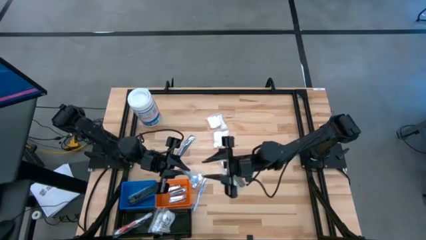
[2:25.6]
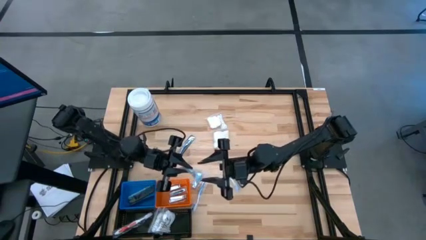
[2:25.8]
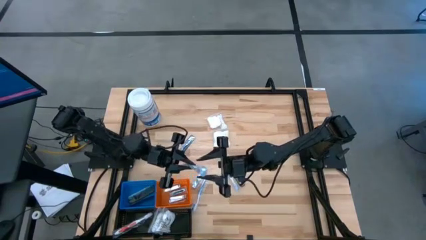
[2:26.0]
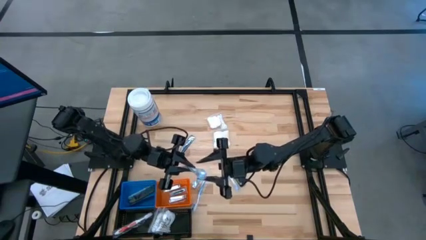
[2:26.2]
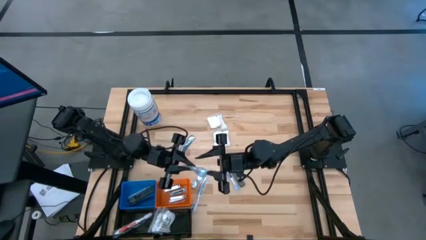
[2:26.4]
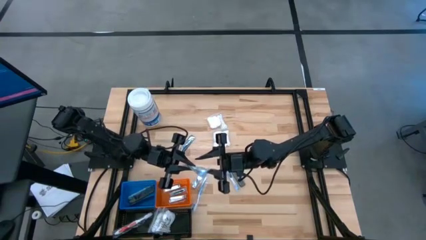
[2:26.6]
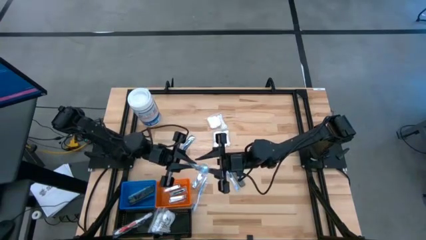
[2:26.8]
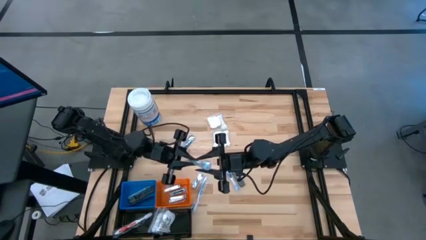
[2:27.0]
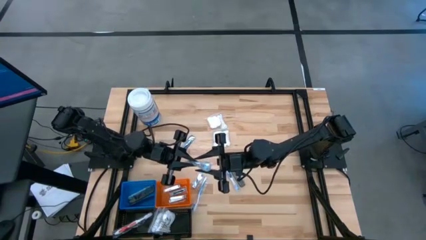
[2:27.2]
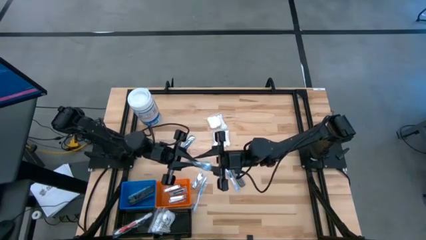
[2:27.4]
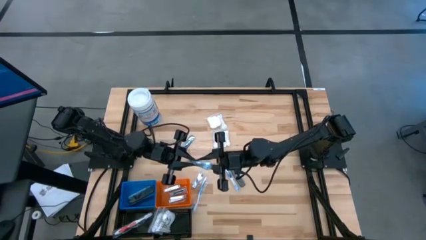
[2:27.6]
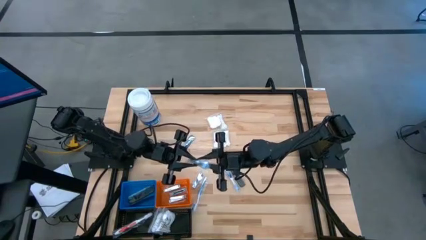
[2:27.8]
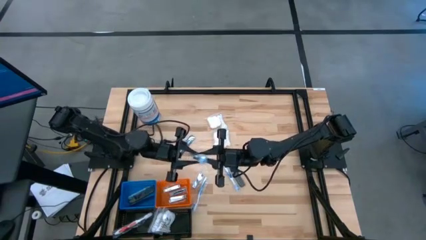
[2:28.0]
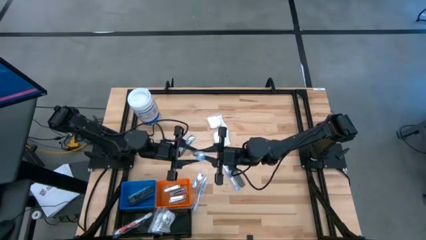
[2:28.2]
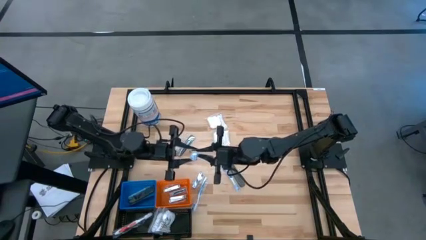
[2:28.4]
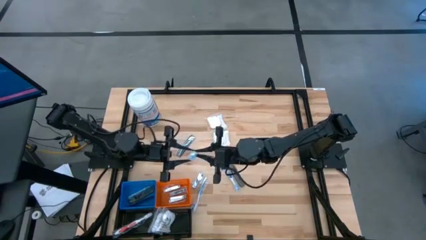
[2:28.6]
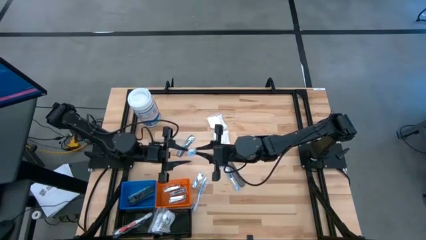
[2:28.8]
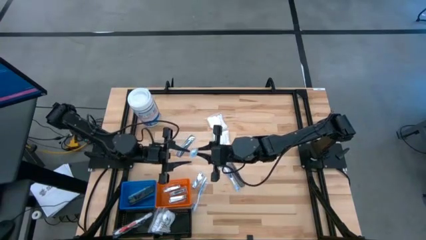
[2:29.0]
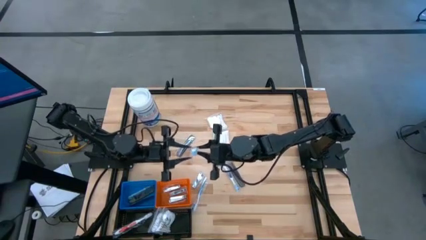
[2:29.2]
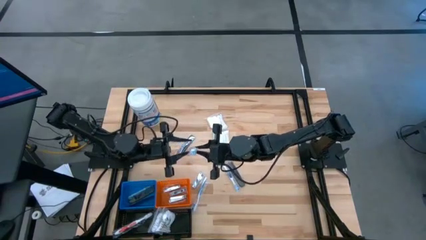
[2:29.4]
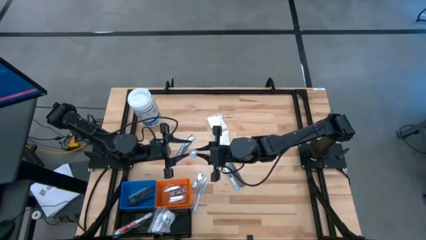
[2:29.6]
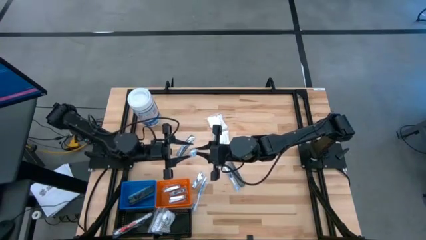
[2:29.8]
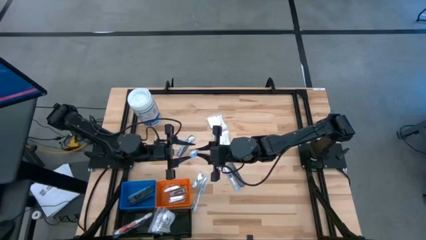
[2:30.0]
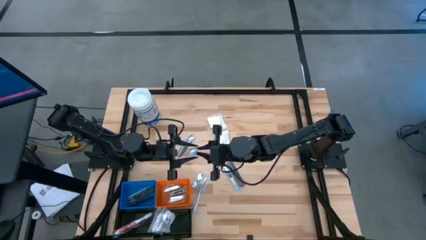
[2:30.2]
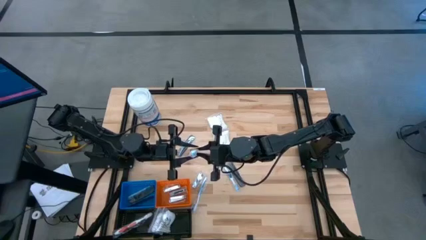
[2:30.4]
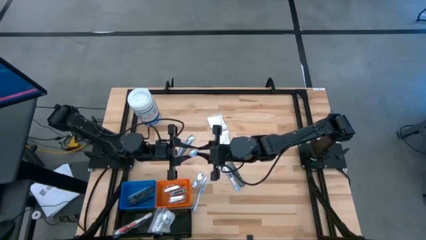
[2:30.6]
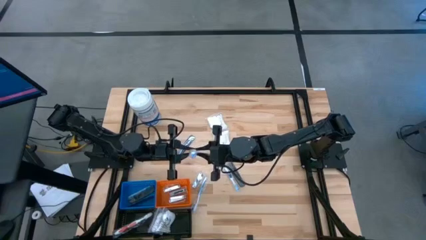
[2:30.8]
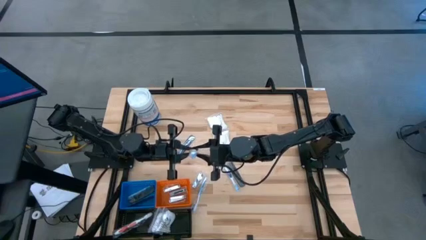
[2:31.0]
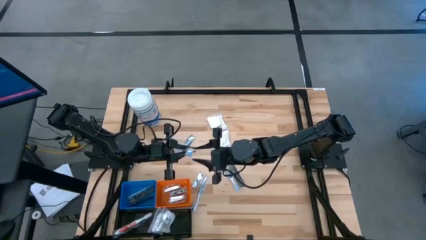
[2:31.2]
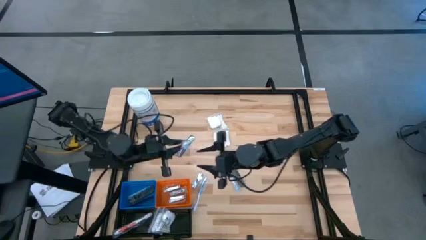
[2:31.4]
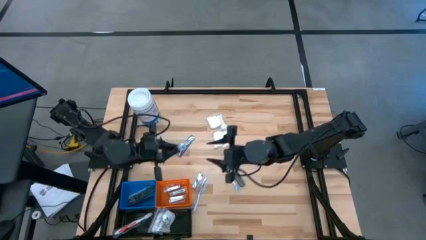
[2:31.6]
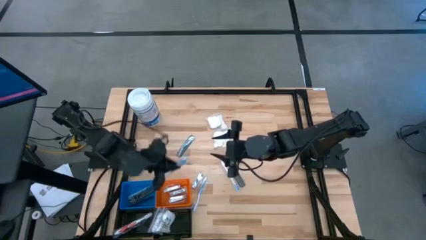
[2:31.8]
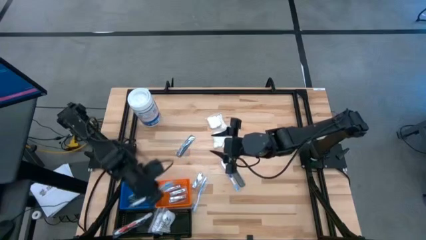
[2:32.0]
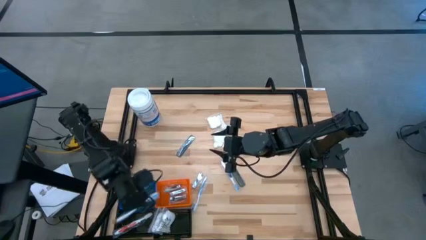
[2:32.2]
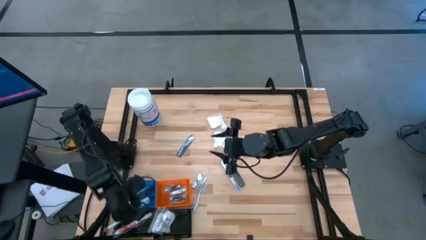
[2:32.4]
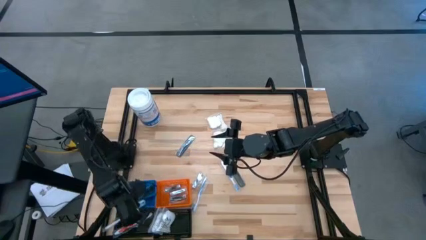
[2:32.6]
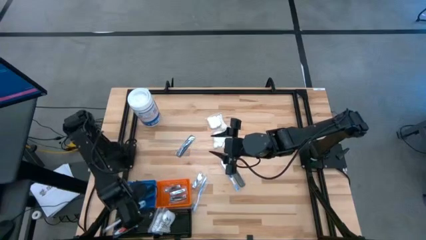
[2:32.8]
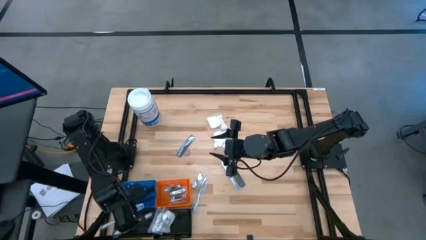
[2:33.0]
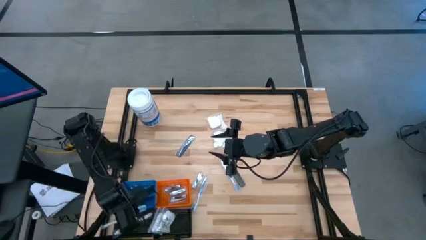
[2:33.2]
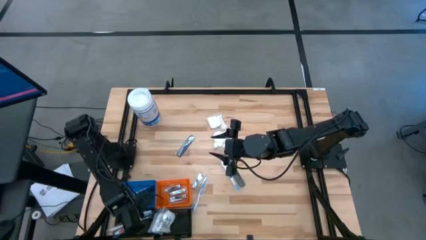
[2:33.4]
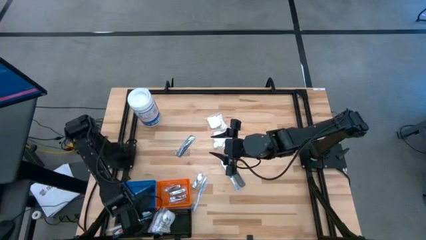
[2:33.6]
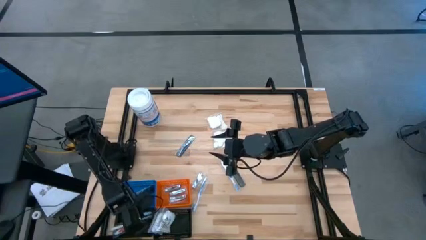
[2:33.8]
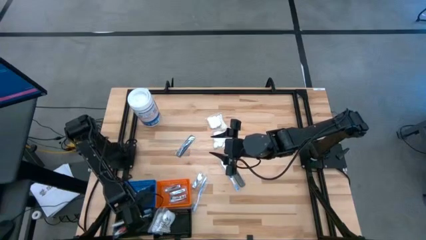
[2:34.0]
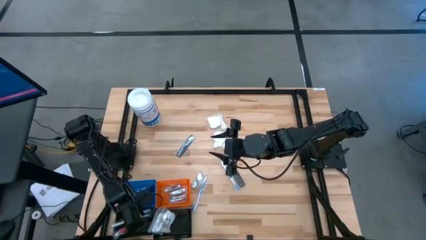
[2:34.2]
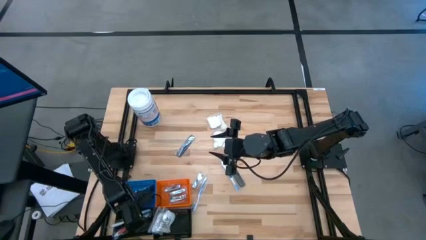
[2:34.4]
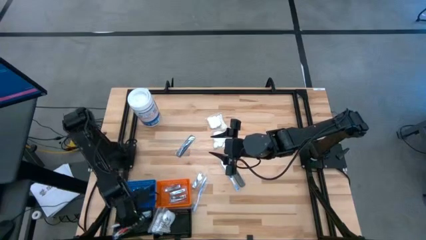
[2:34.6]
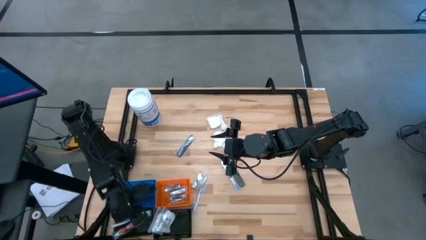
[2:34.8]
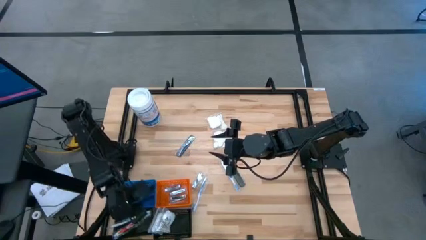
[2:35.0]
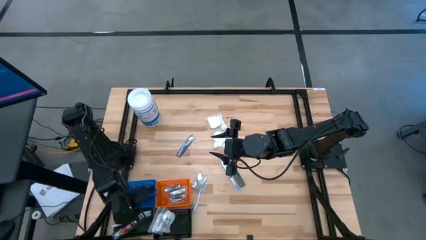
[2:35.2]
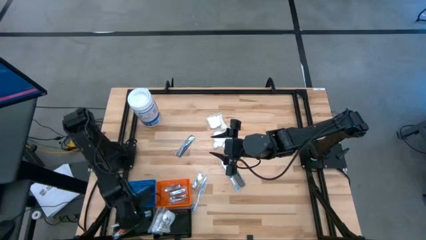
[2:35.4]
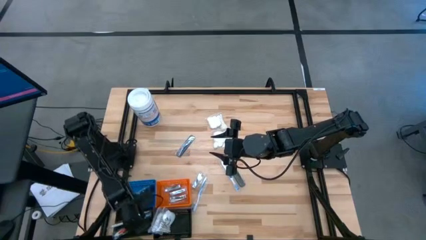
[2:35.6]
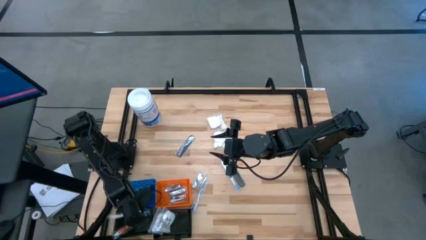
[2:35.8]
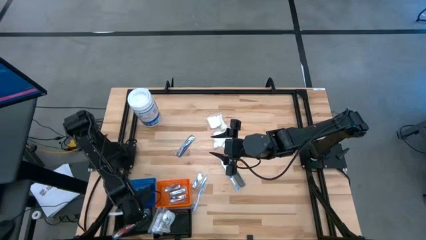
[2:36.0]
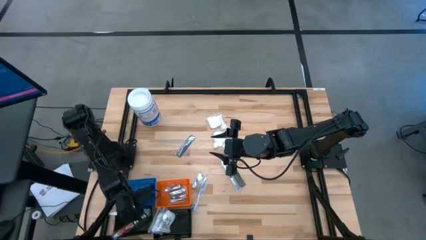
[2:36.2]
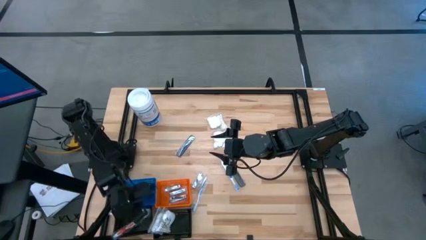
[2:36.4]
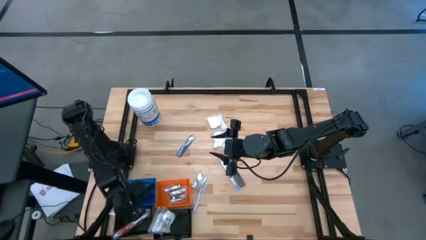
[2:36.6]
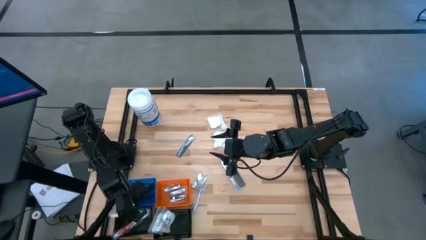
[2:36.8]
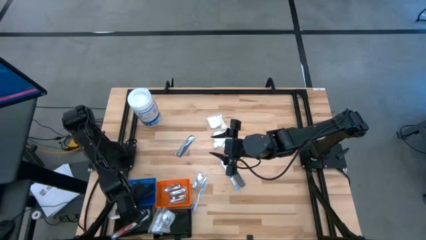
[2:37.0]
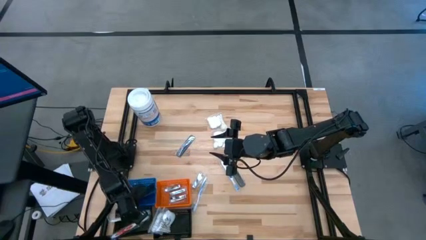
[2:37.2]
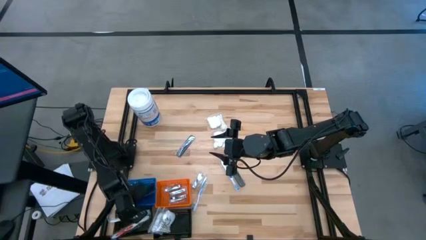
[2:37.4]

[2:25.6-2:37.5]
Task: Pick & Place Travel size toiletries
Put the right blue toothbrush into the left black basket

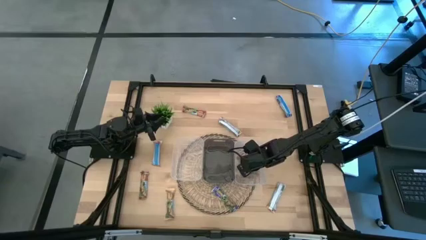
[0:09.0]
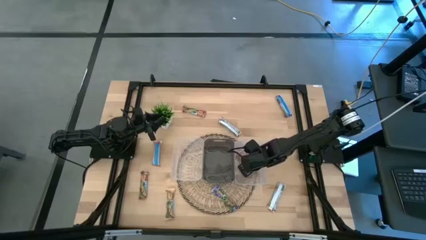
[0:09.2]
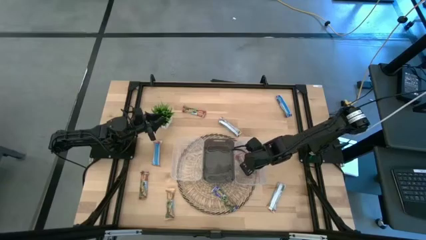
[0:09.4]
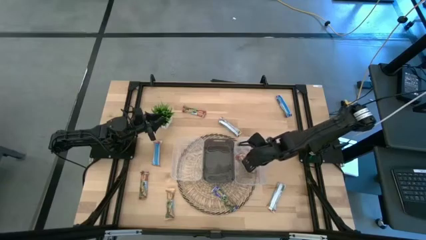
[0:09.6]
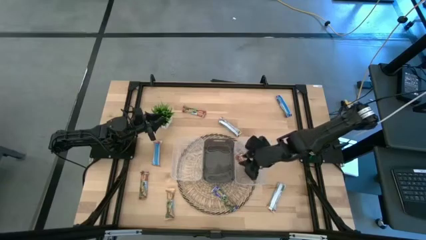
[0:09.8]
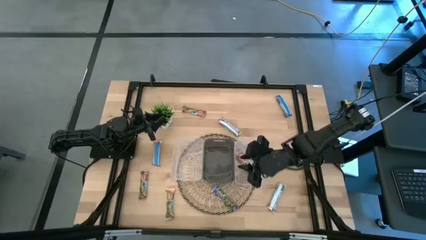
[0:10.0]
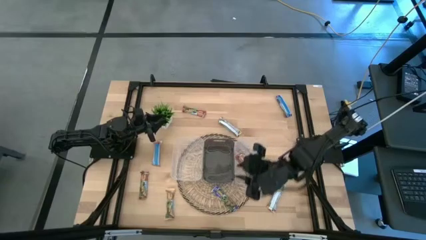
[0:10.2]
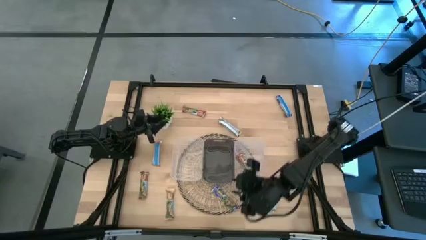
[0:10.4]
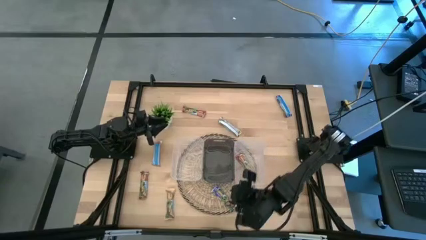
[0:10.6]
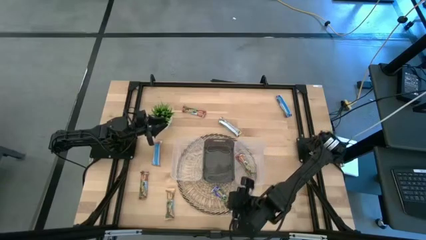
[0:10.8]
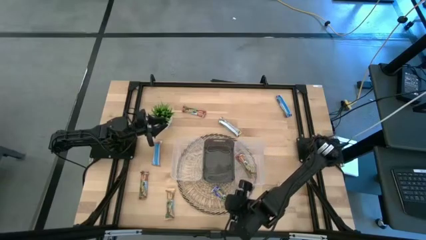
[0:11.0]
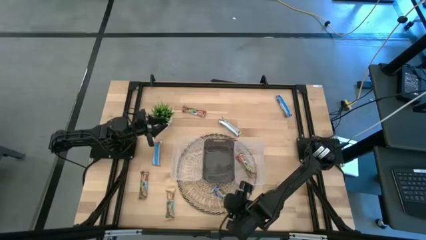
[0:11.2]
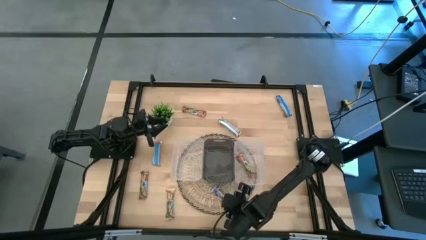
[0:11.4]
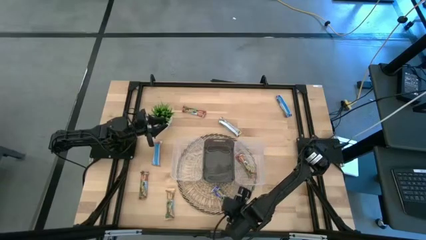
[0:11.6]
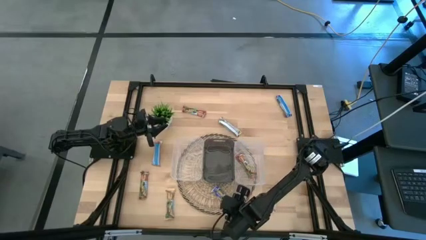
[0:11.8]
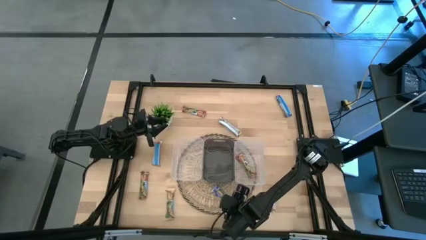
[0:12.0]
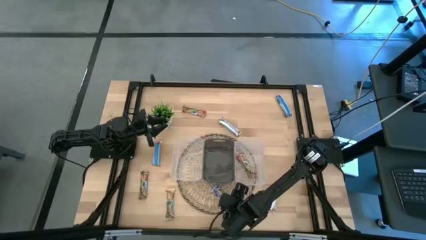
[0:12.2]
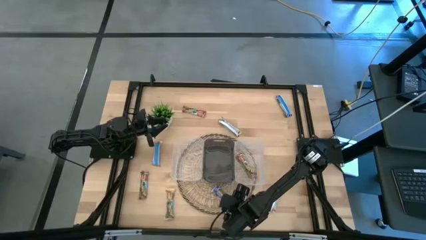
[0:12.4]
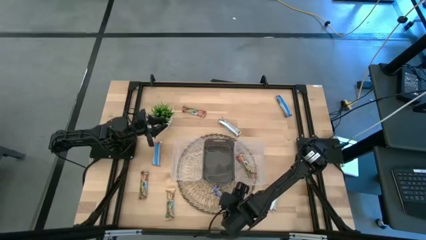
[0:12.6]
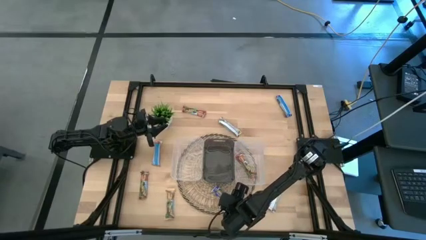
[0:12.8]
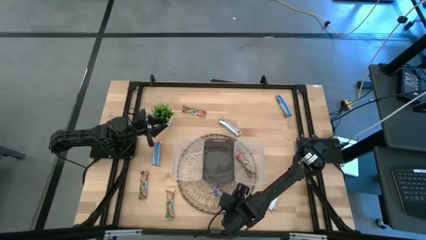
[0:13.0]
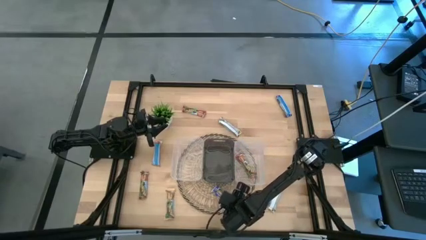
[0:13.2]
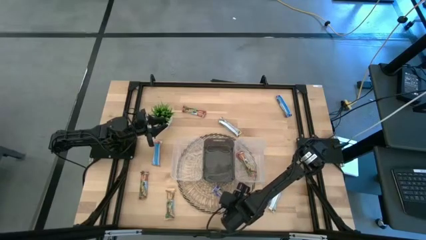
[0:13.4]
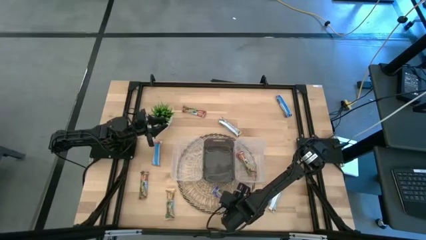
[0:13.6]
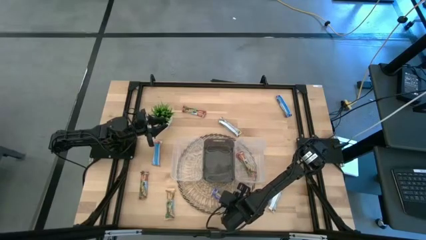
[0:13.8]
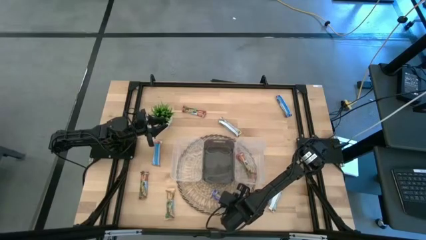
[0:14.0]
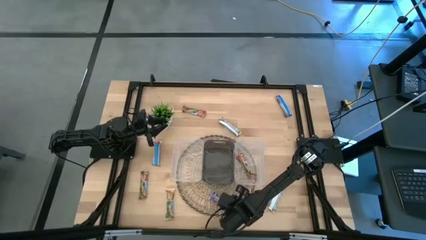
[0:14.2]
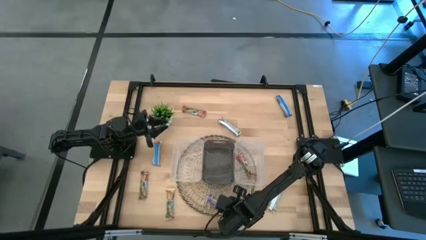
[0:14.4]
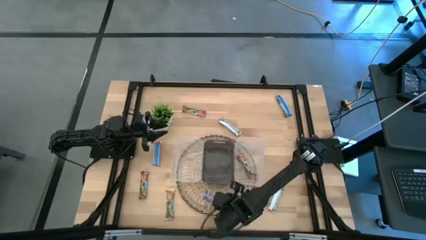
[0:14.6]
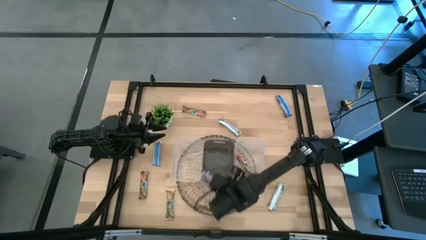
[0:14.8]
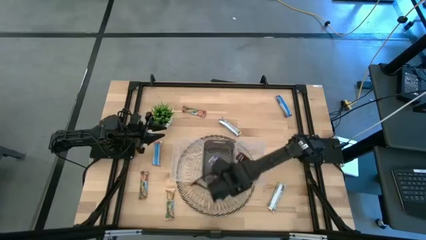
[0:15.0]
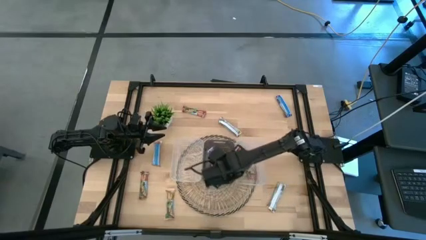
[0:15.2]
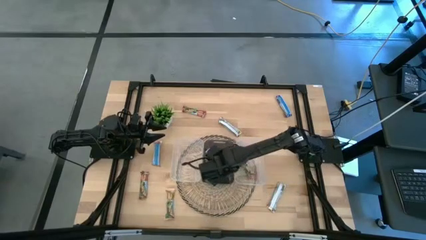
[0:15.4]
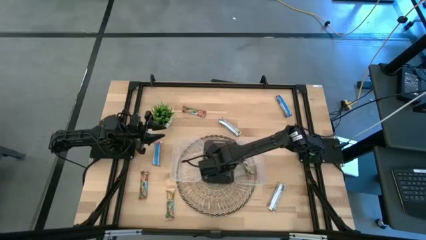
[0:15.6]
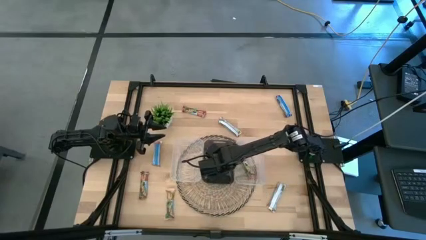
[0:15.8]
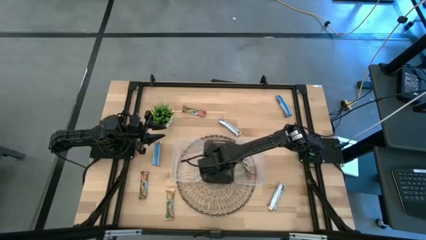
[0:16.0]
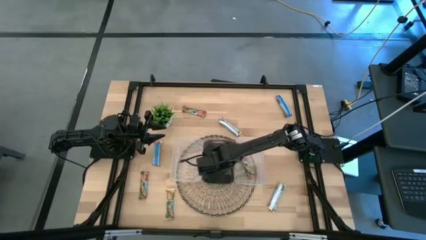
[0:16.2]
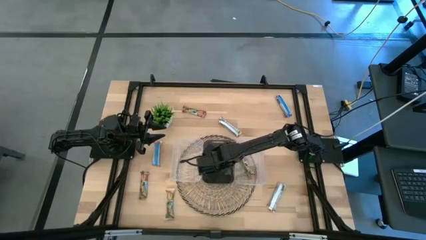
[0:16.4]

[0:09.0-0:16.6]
Task: Pick and place Granola Bars by type
Put the blue granola bar into the black bin
